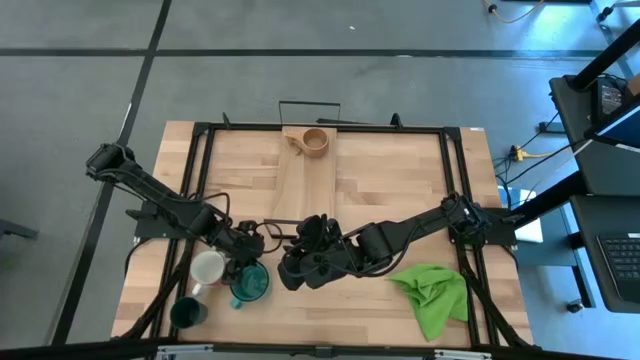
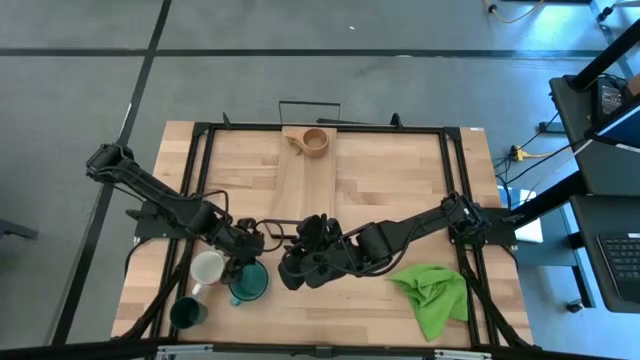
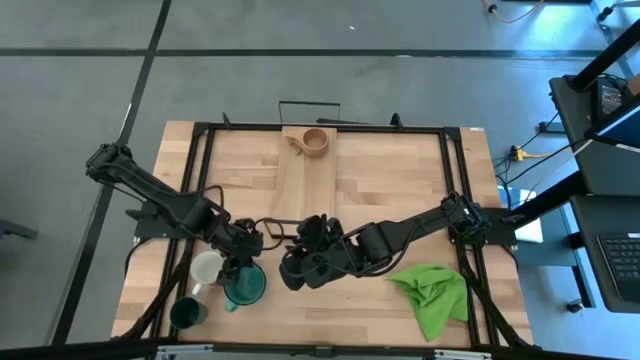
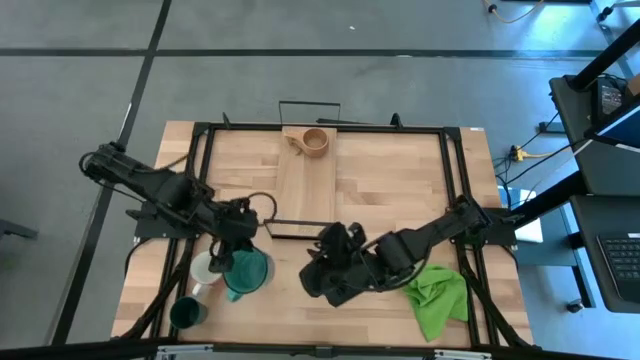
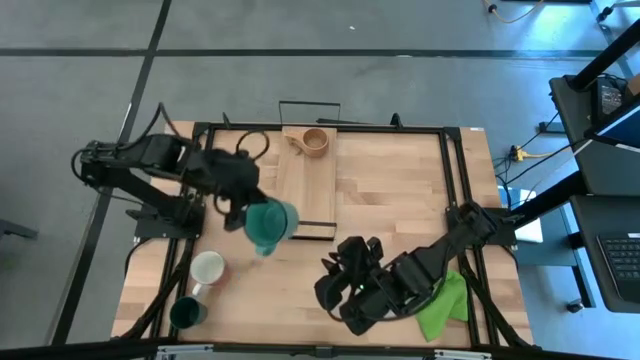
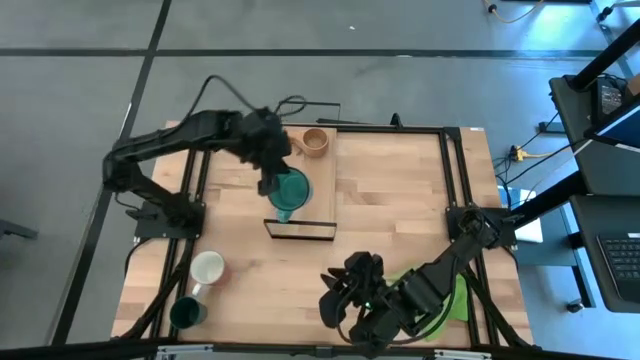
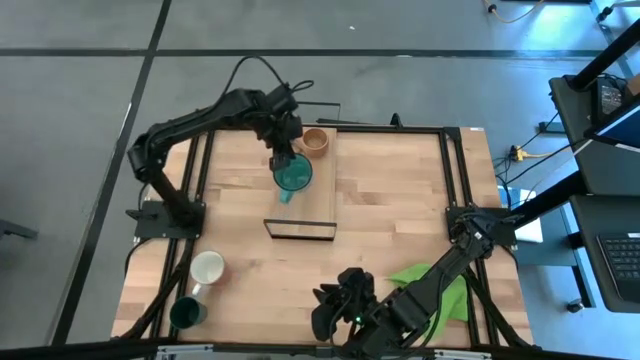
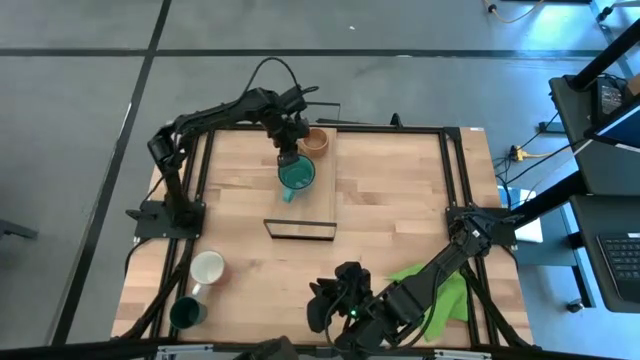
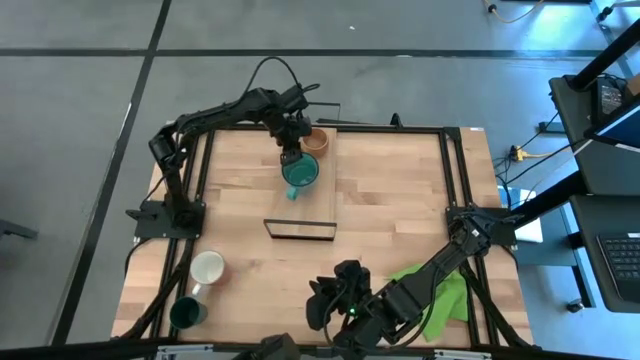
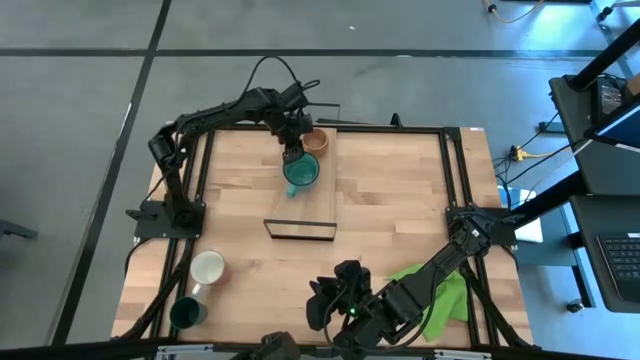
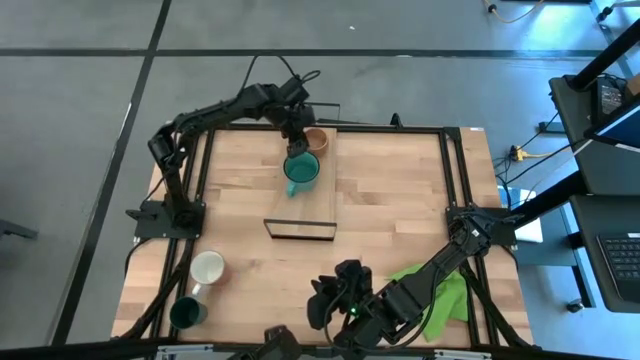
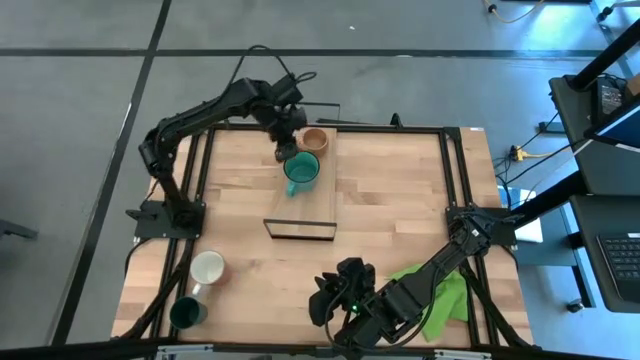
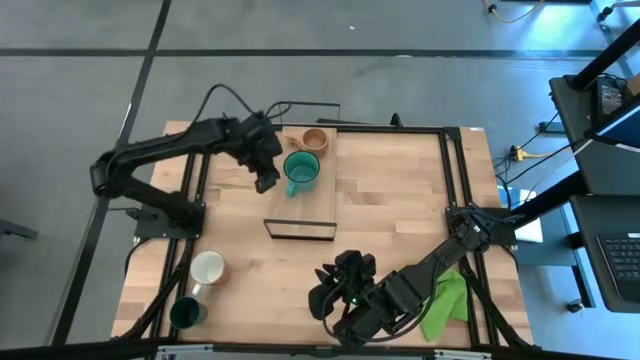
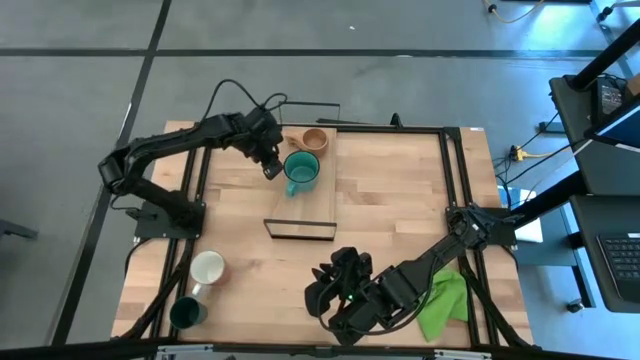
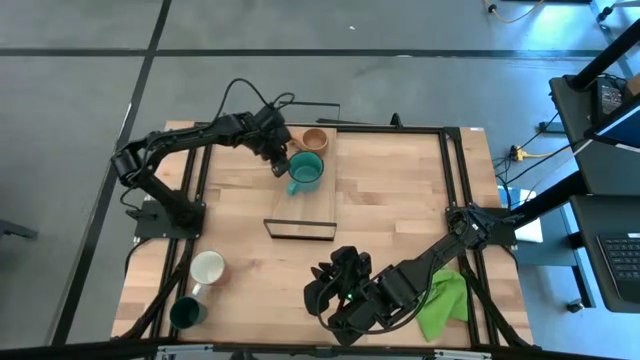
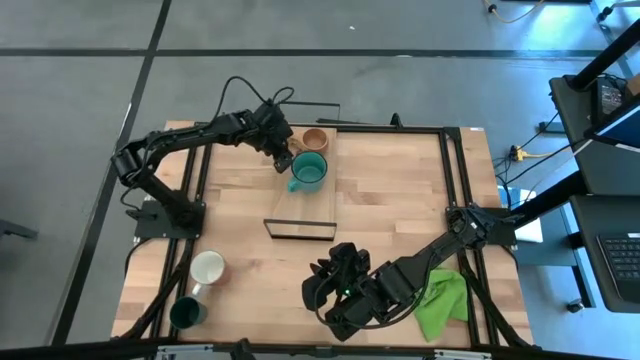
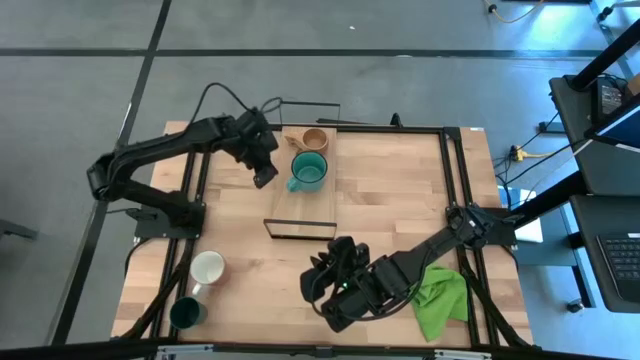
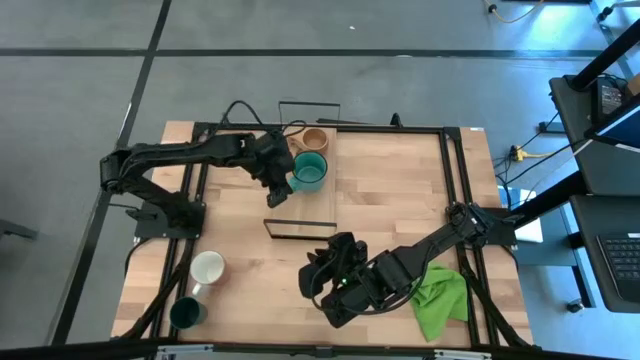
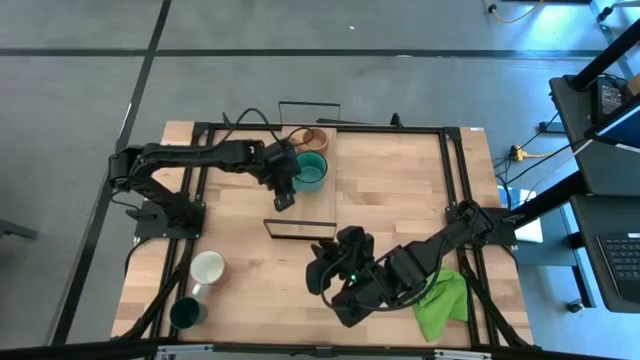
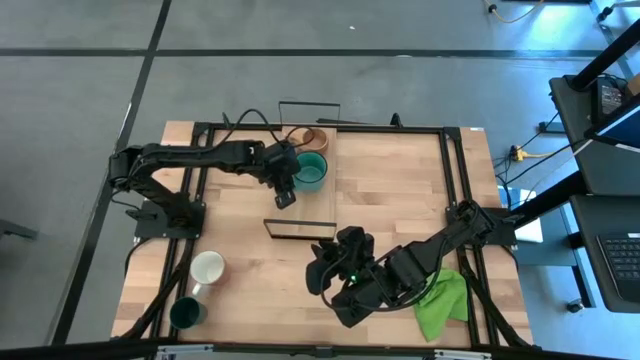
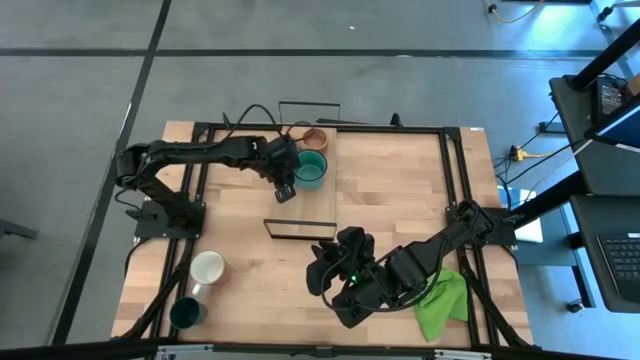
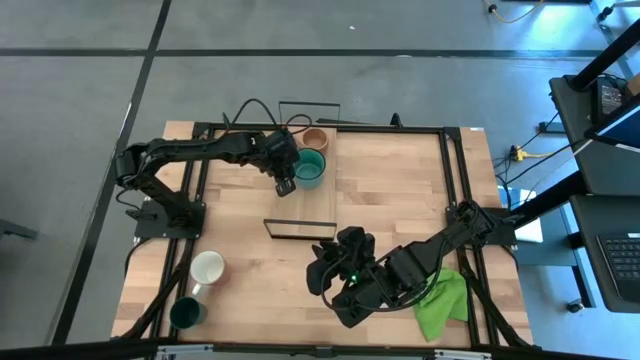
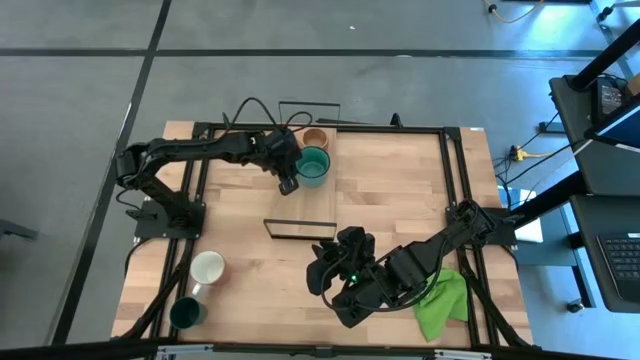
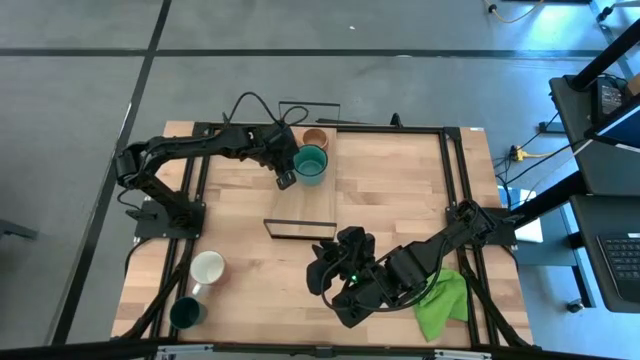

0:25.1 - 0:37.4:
Task: Stack small to large cups/mugs on shelf
Put the blue mug on the shelf

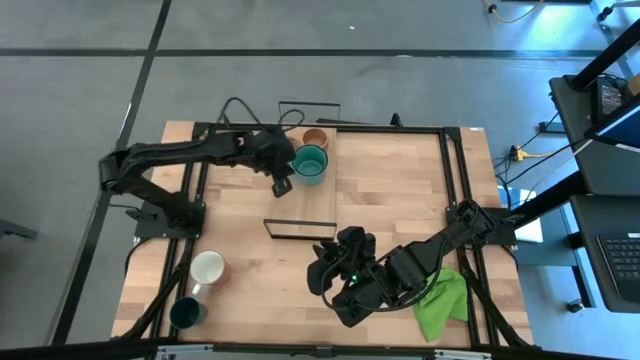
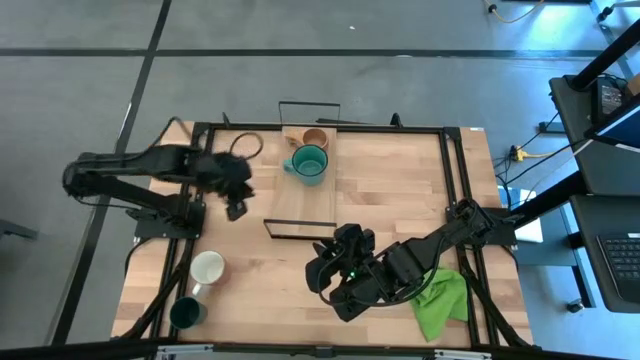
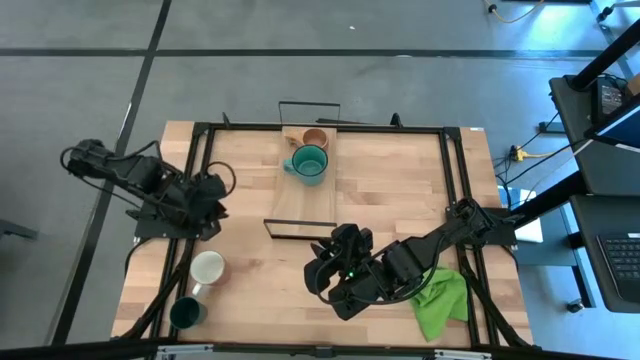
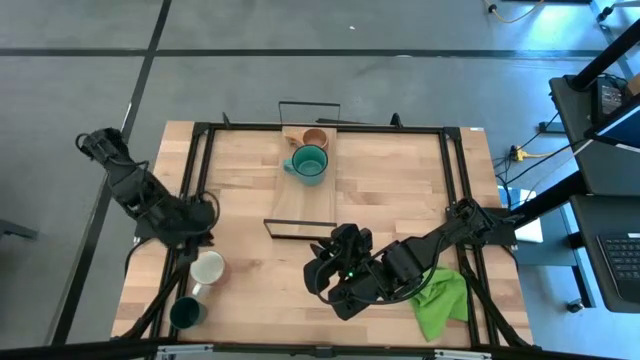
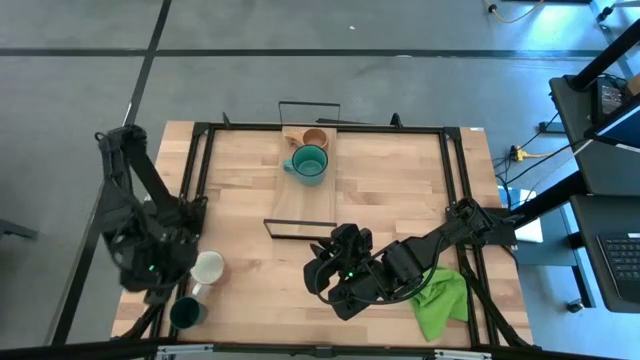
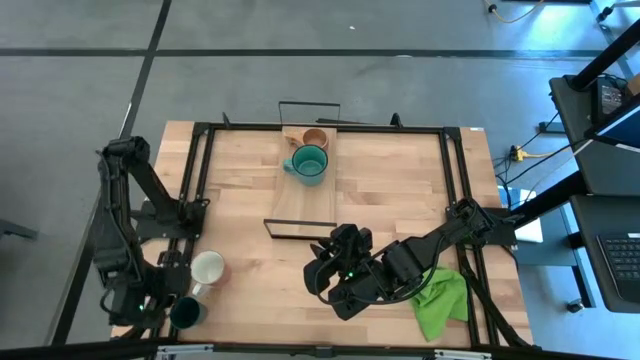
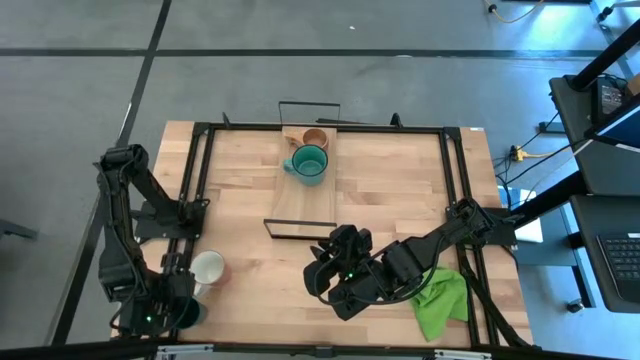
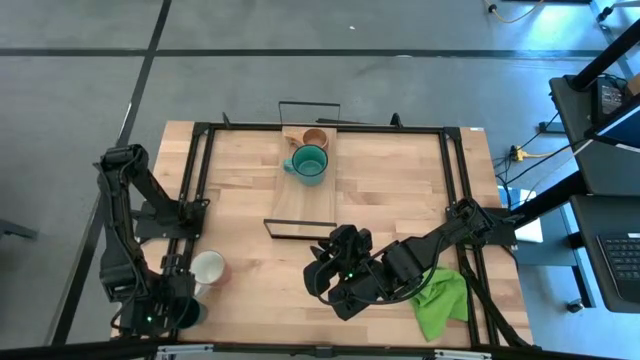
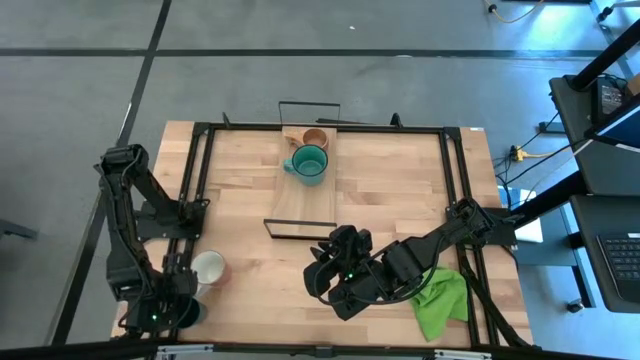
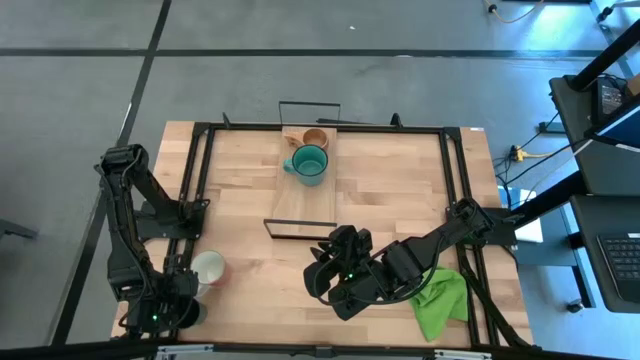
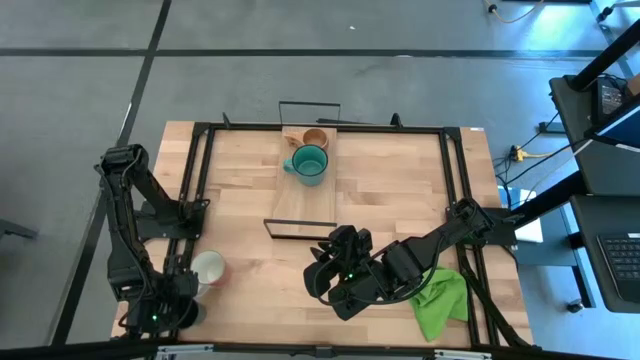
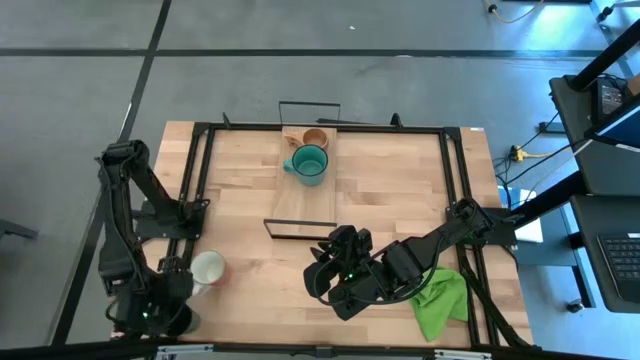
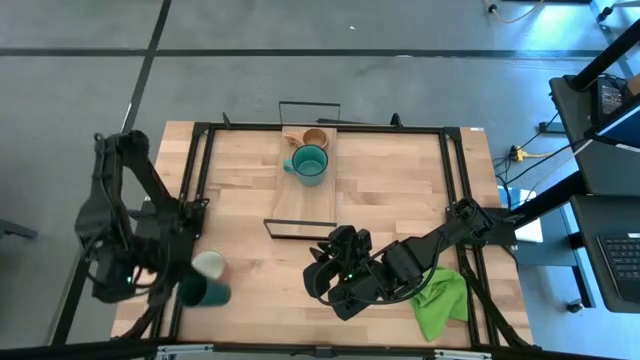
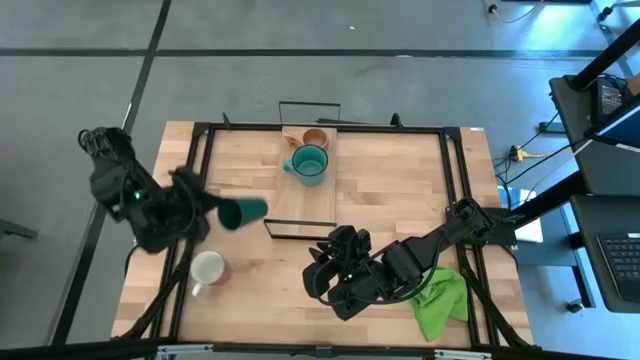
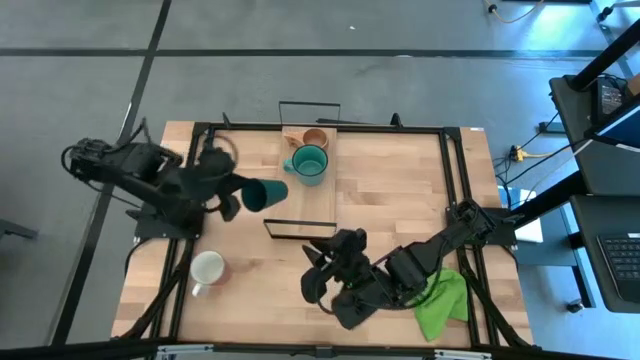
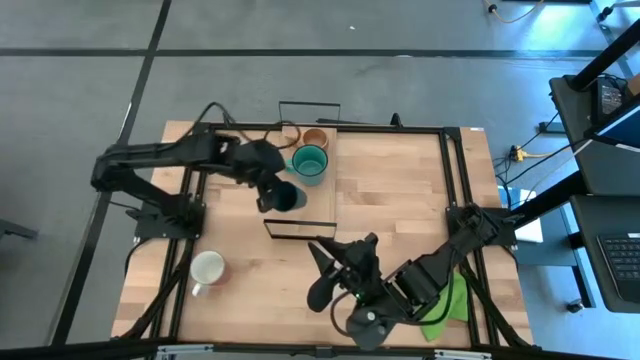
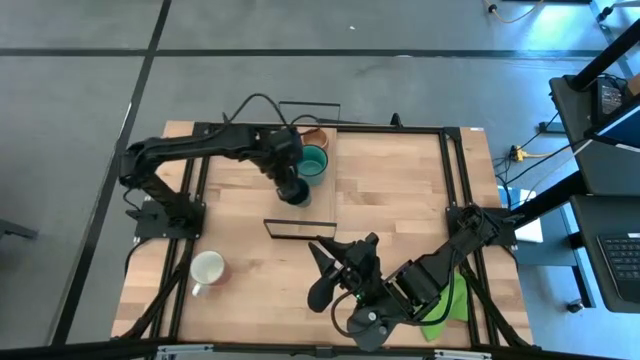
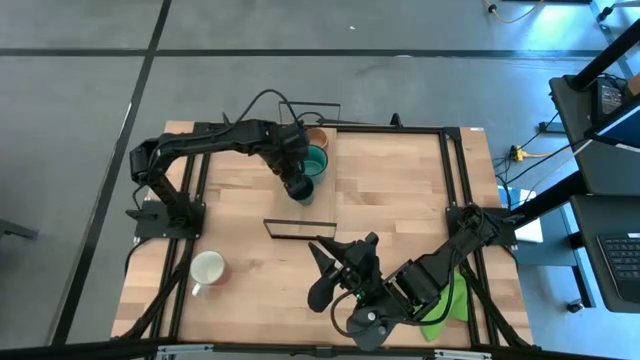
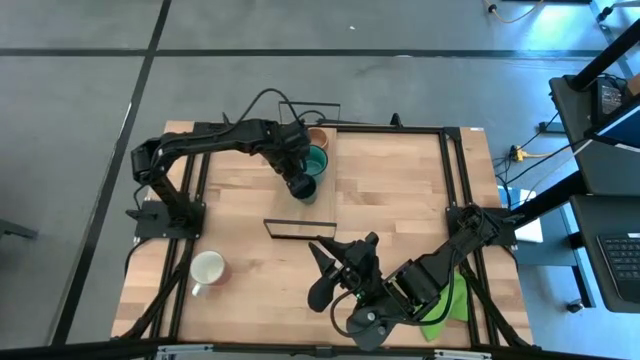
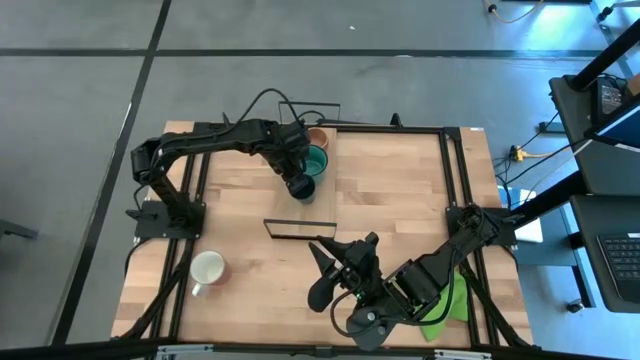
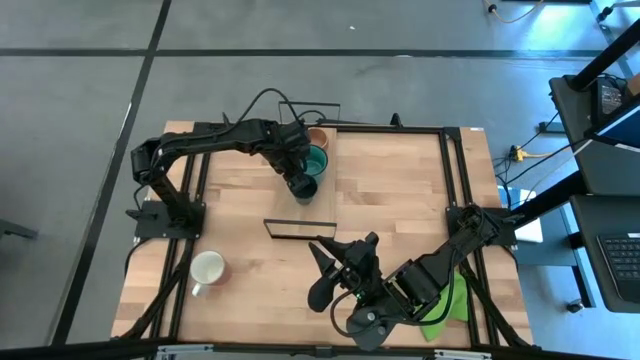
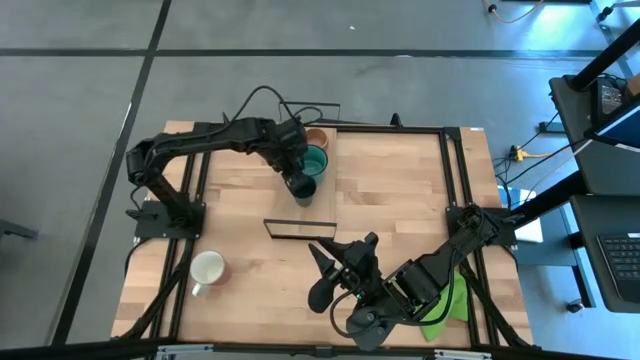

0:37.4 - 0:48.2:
Put the green cup on the shelf
